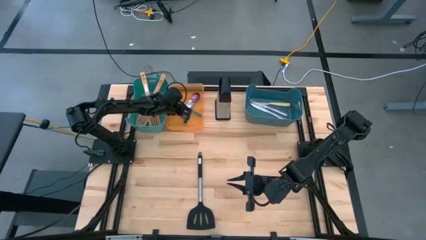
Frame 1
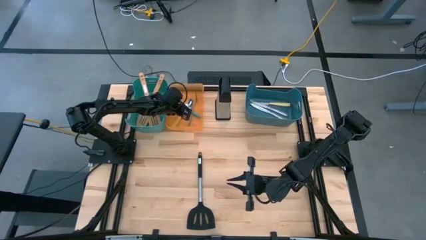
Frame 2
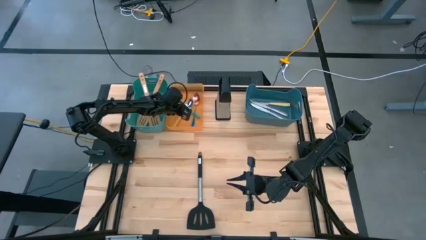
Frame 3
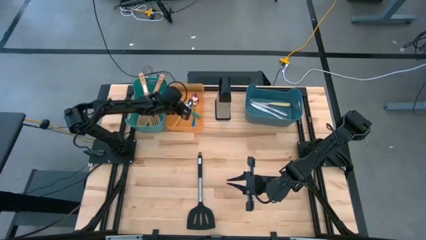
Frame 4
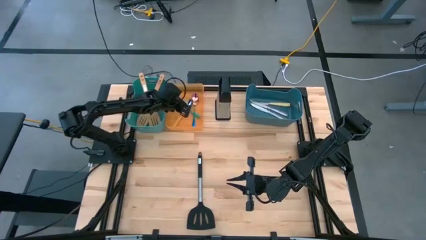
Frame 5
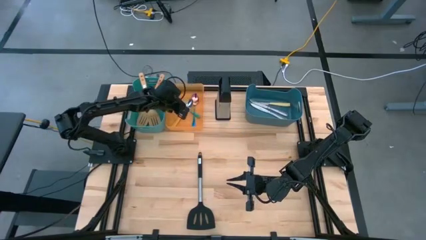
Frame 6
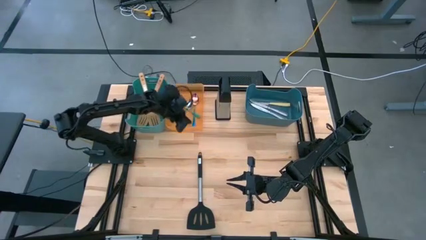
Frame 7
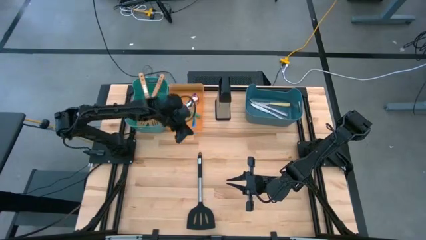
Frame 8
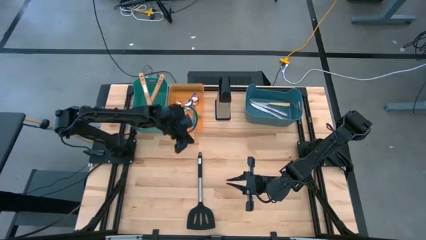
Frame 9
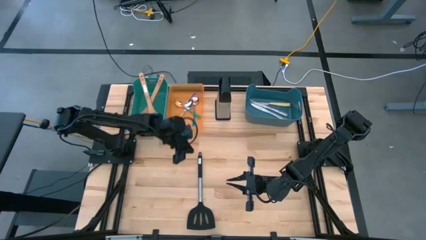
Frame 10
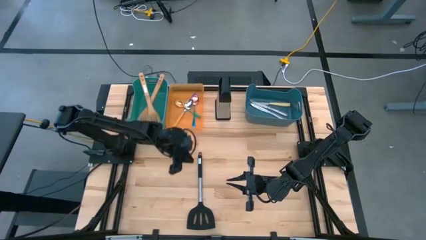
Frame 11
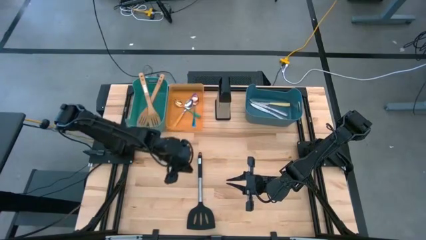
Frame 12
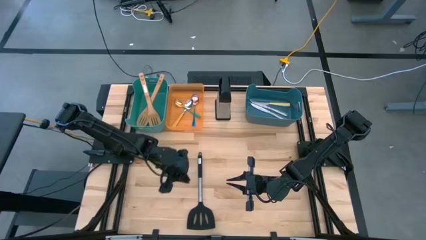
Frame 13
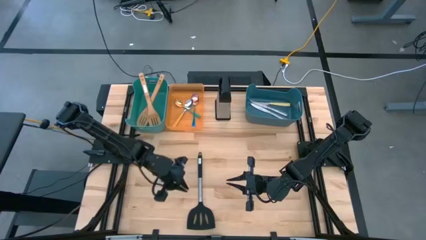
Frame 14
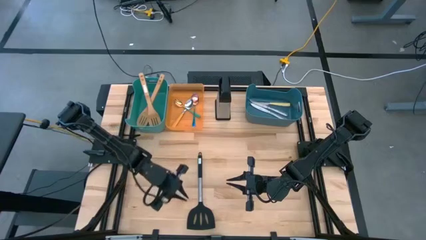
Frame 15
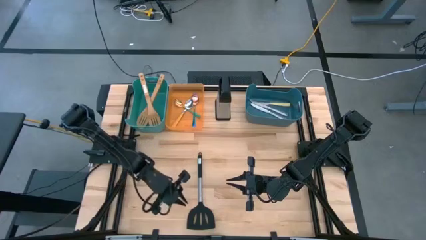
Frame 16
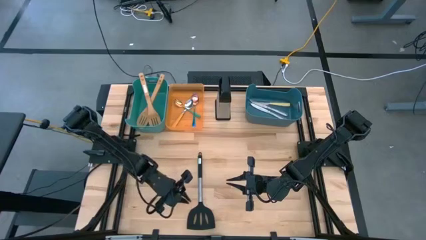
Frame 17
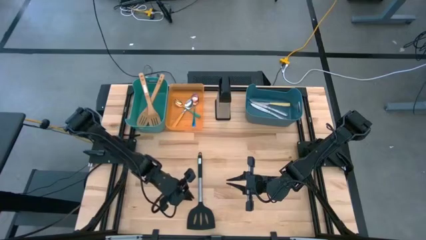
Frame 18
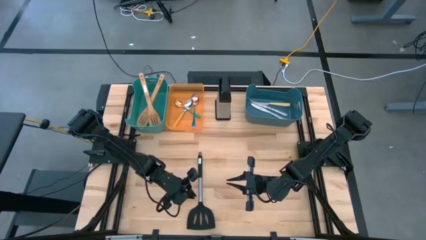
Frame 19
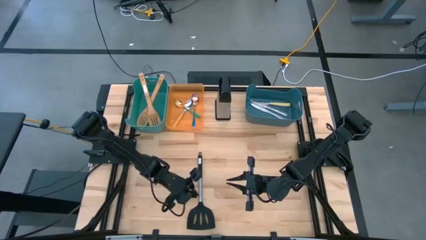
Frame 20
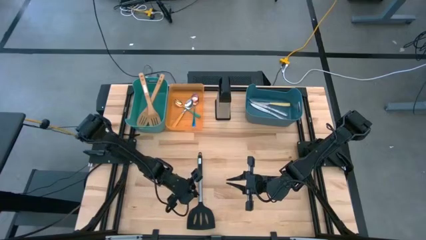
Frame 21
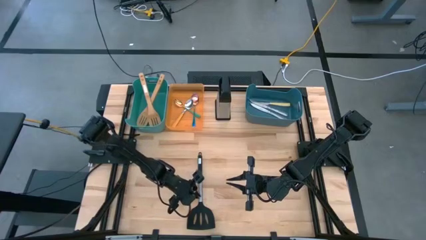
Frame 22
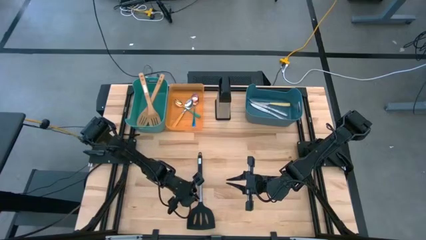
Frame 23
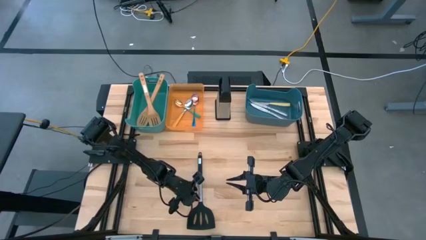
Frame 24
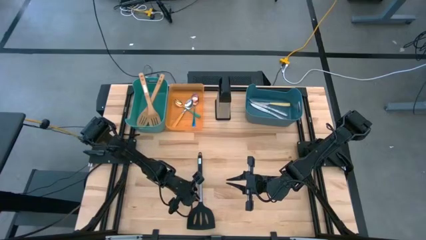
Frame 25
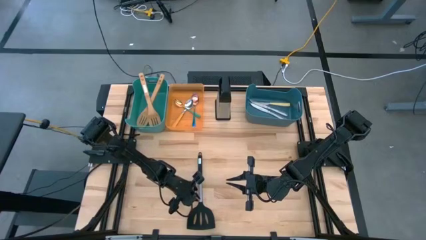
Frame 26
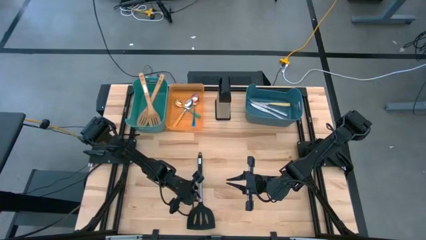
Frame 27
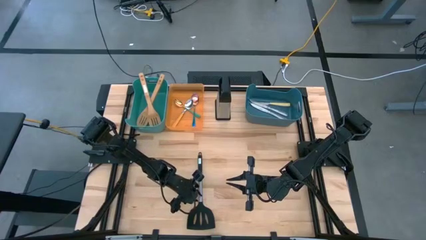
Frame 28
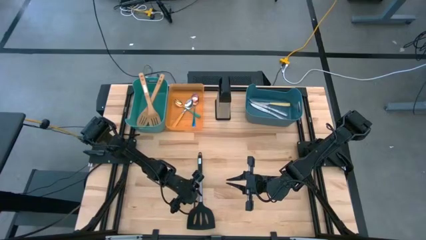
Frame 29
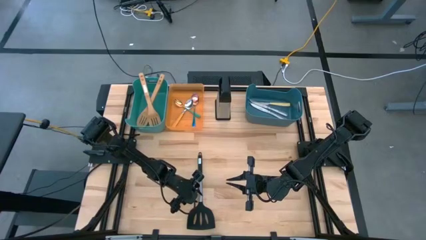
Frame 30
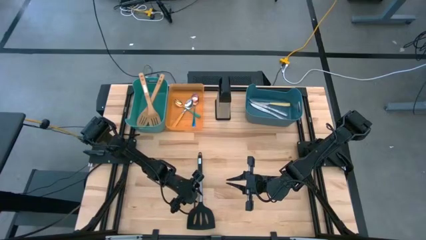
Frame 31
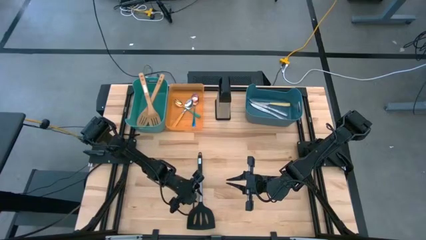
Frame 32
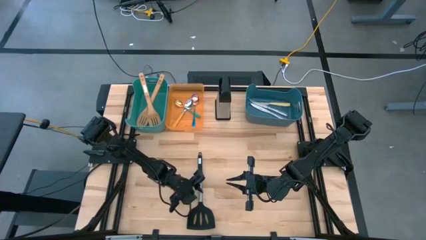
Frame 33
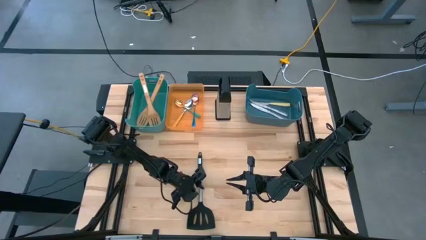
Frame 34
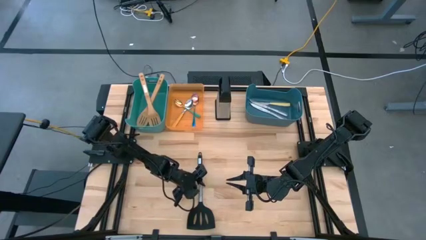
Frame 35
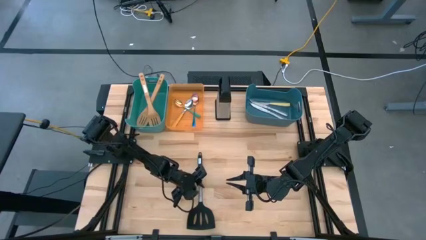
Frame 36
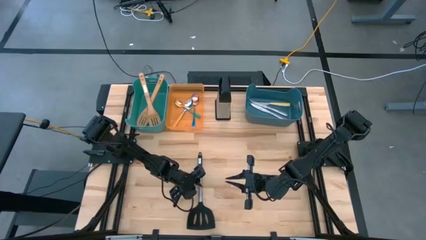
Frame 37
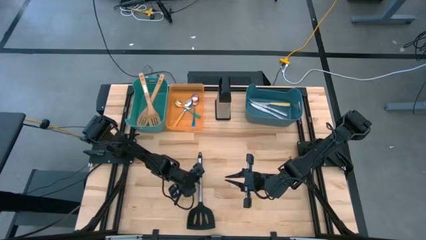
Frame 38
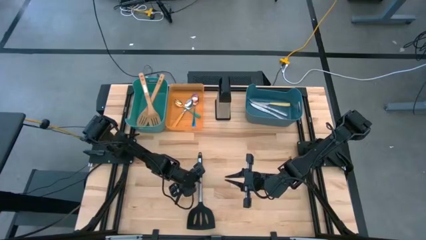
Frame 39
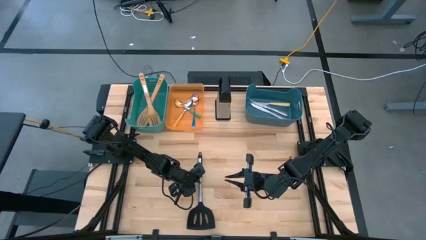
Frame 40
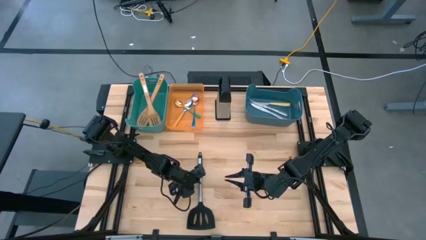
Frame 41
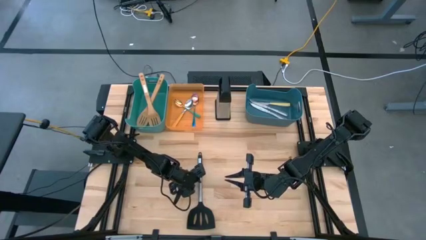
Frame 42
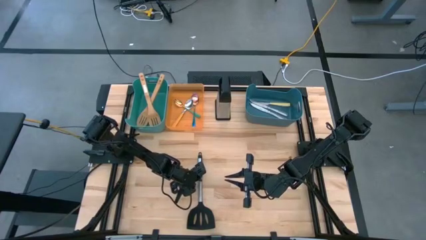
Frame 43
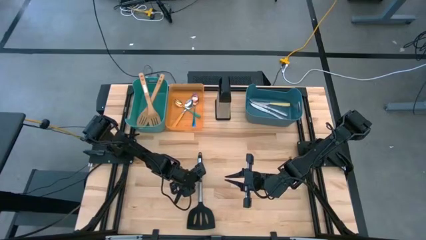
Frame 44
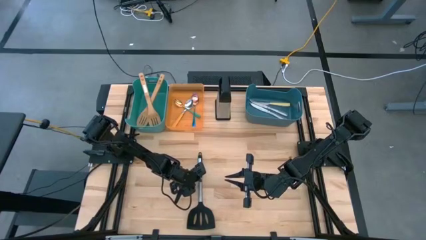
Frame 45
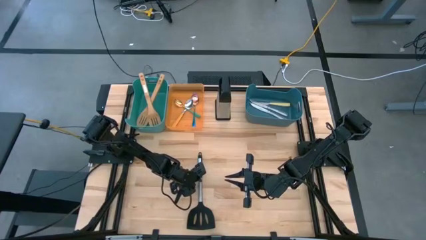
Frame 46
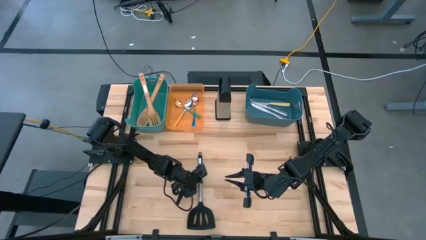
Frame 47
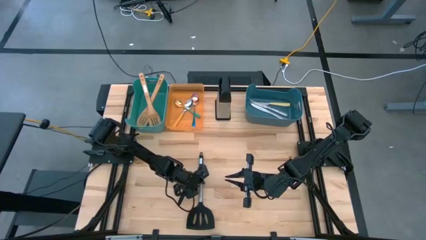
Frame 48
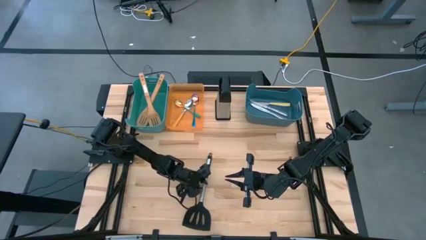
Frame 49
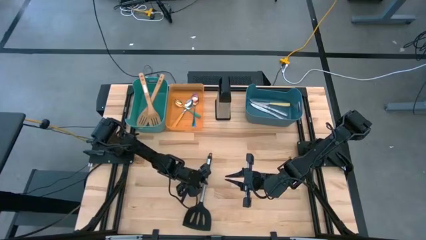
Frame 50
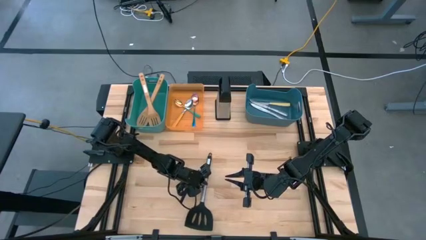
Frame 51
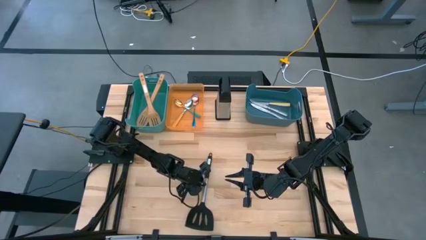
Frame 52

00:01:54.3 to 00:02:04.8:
Task: Pick & Place Kitchen Items
Put the black spatula into the green bin

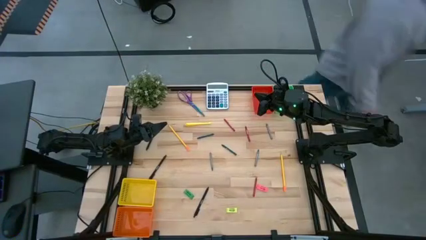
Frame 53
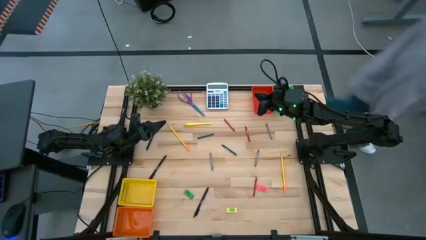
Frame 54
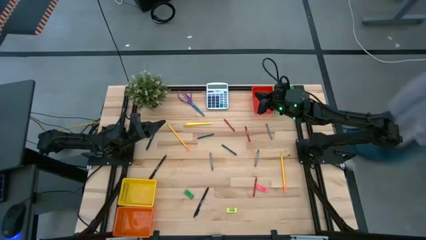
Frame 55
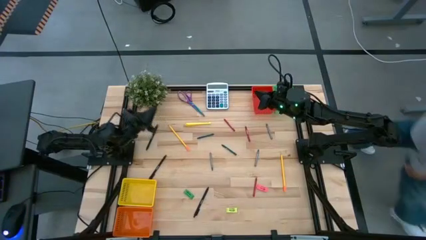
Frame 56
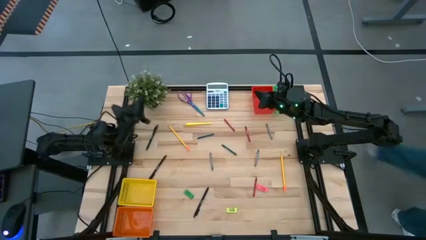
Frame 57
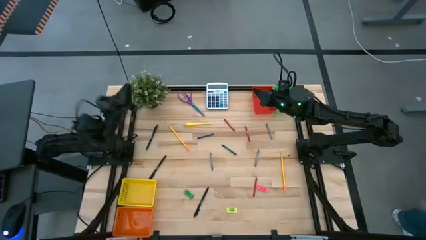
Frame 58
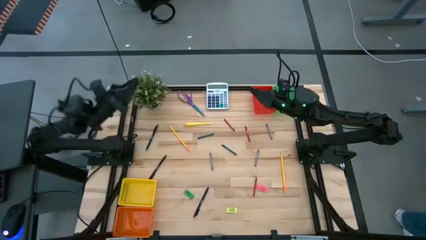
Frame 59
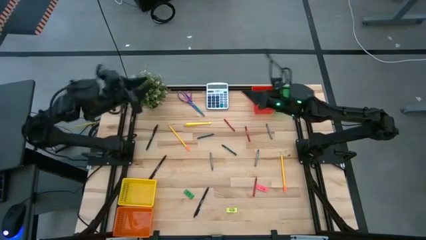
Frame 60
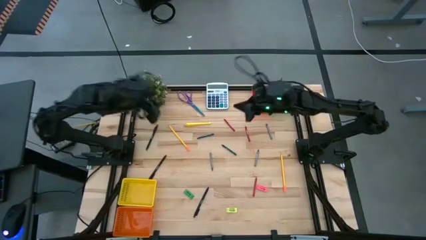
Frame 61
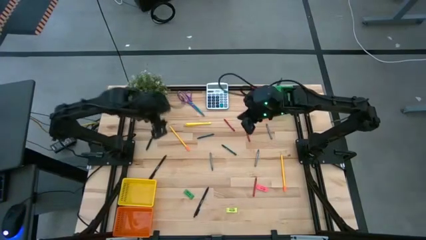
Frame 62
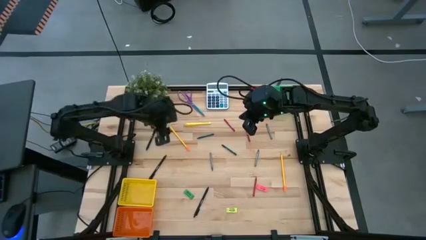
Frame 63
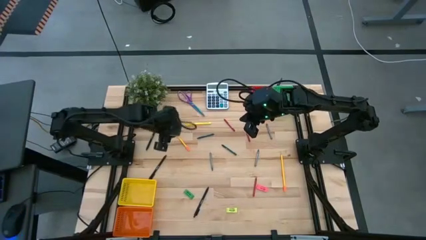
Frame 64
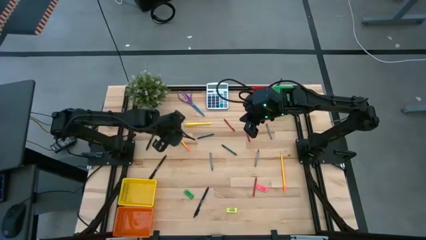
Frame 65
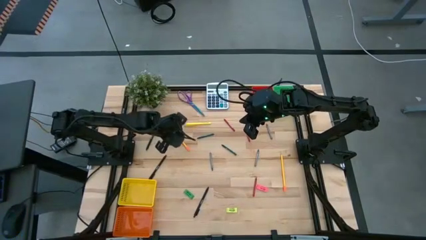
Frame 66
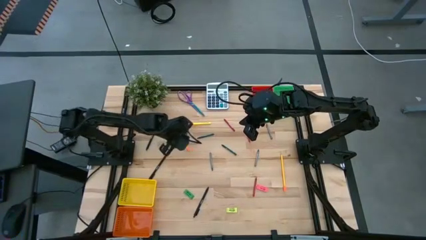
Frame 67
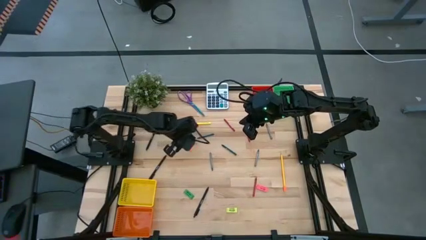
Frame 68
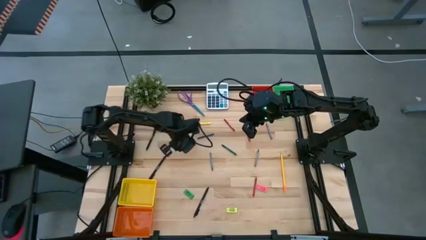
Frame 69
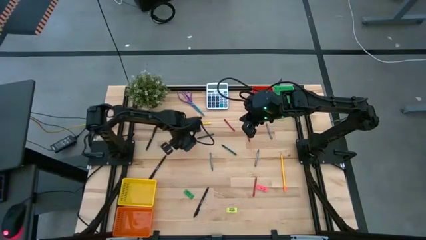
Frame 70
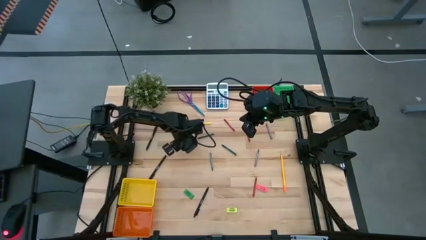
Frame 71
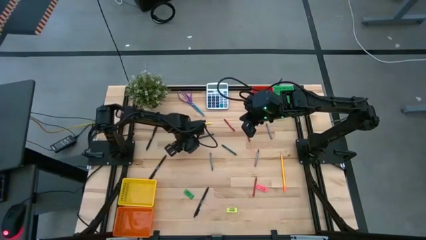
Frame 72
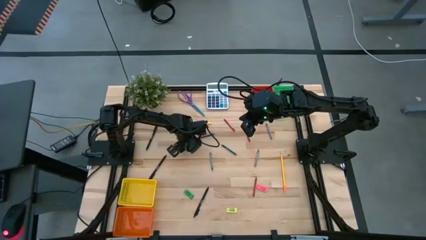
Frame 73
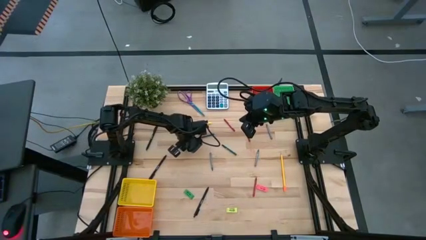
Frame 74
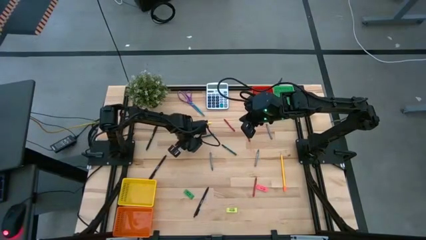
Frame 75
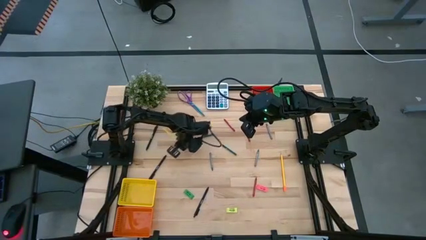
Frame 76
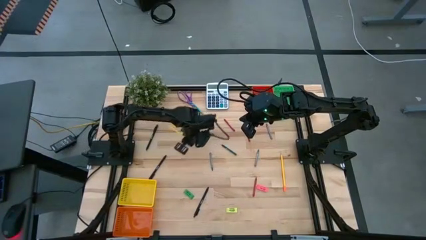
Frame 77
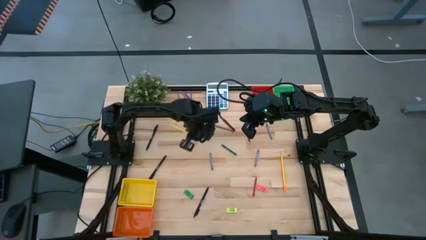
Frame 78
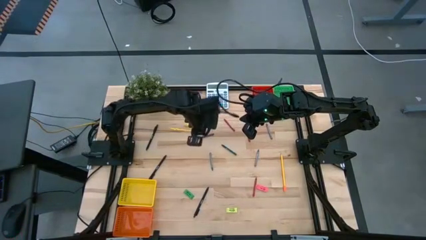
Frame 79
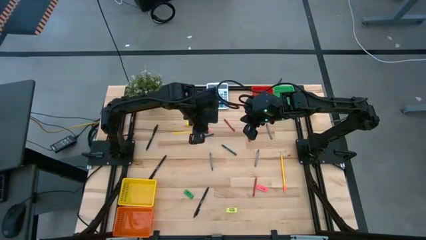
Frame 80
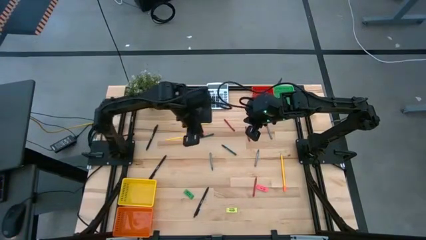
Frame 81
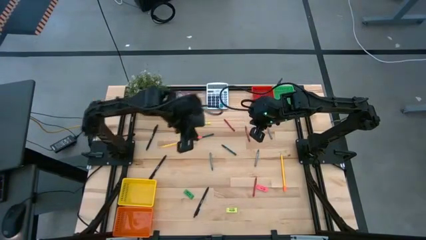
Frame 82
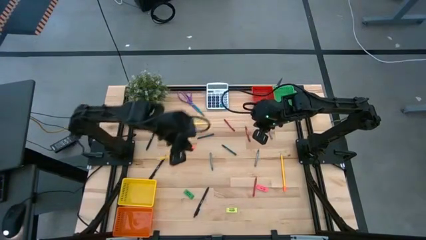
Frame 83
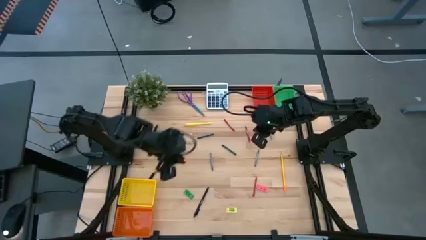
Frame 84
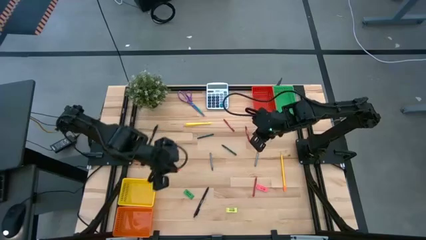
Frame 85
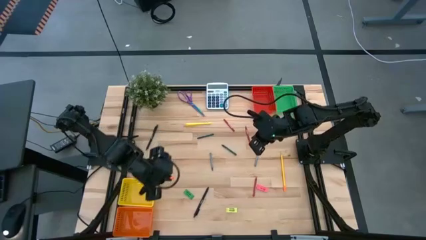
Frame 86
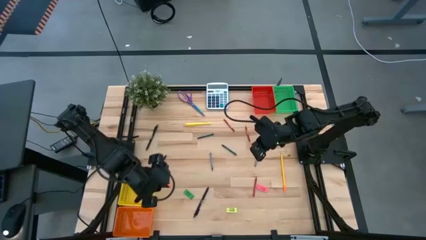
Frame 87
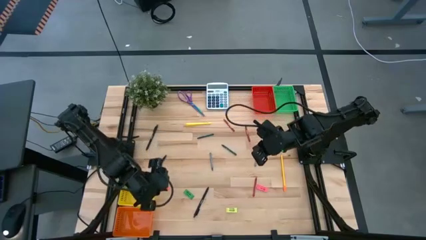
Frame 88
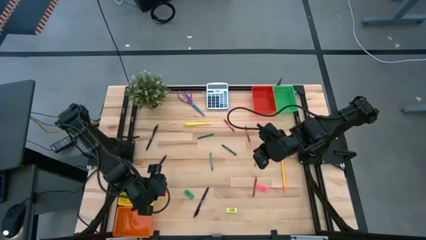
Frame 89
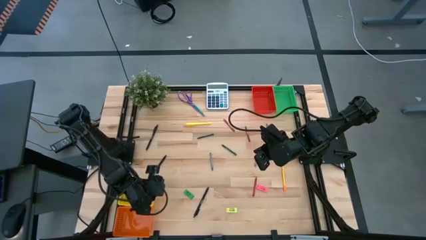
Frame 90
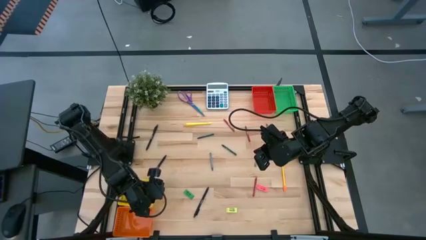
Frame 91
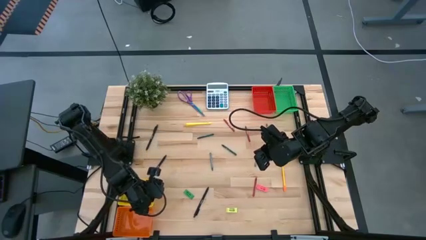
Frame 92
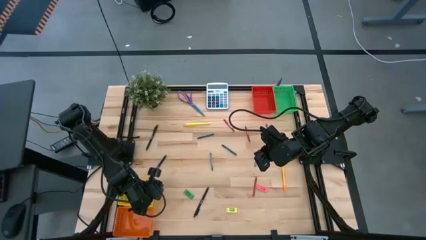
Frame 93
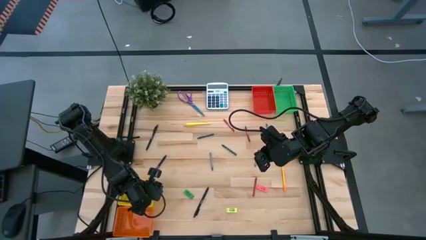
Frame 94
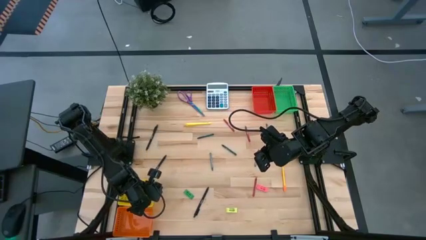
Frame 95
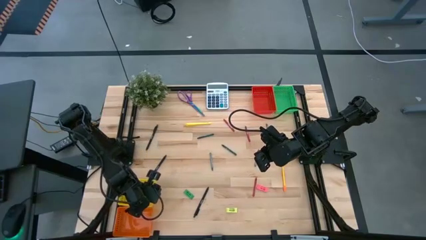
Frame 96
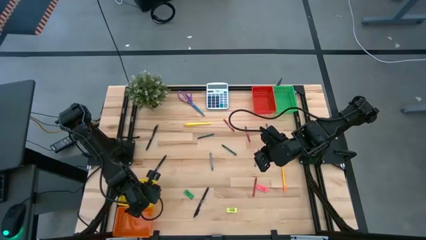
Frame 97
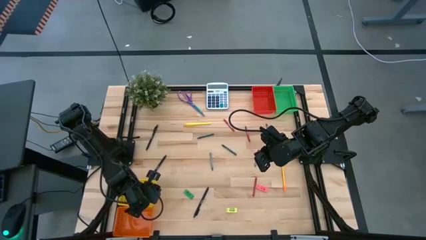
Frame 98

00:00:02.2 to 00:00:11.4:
Task: Sort crayons/erasers/pens/pencils in bins
Put the top yellow pencil into the yellow bin
